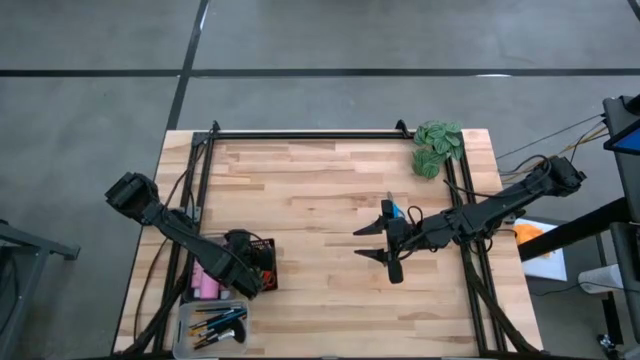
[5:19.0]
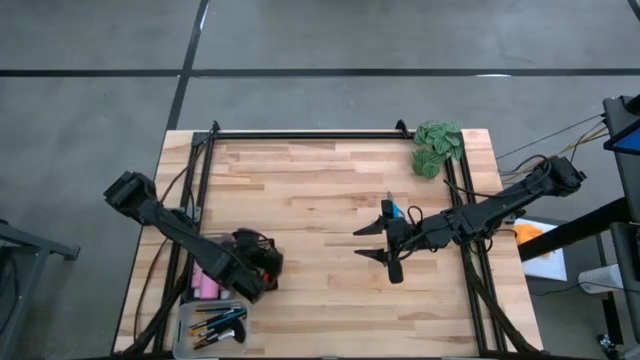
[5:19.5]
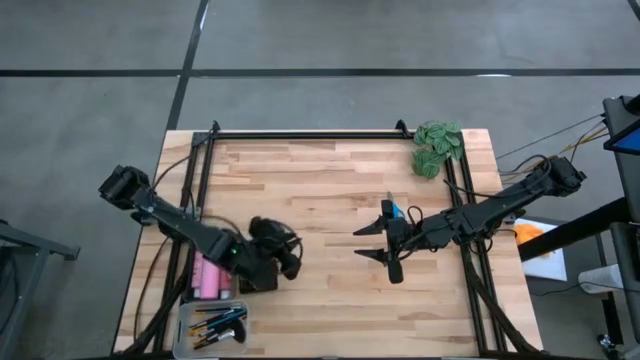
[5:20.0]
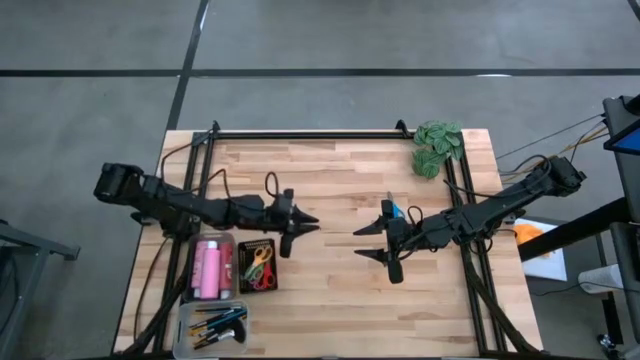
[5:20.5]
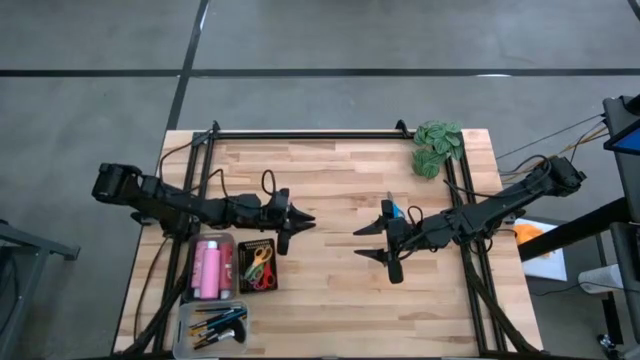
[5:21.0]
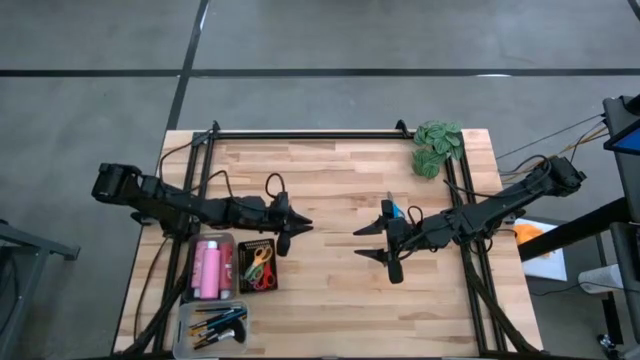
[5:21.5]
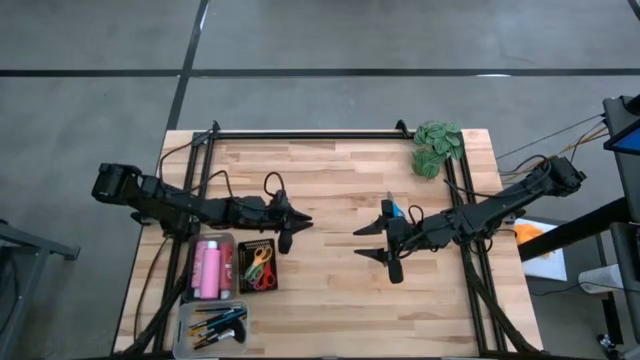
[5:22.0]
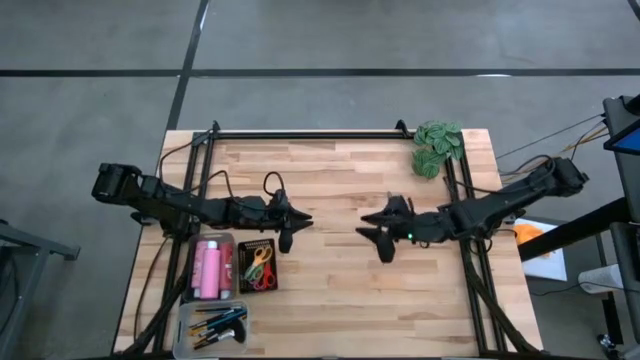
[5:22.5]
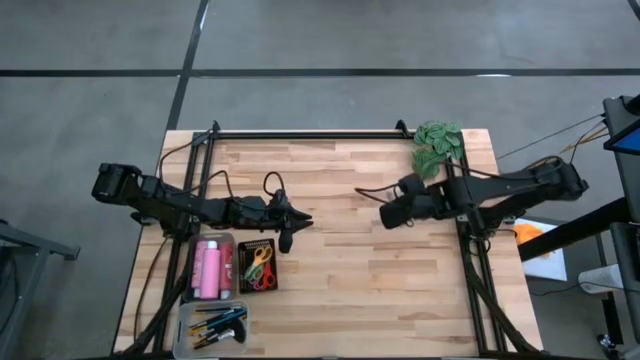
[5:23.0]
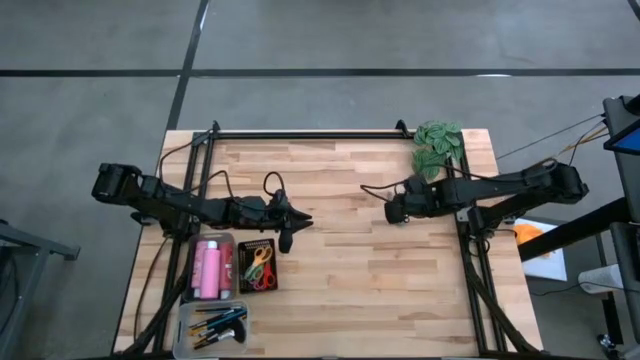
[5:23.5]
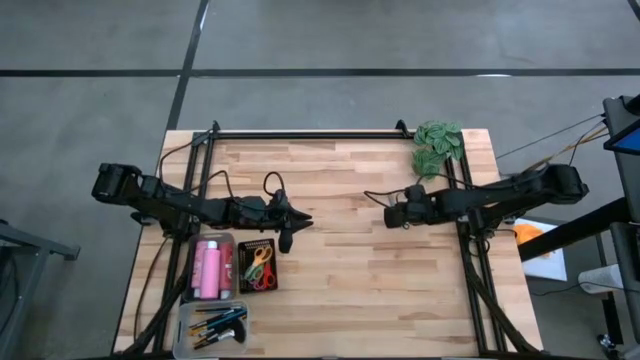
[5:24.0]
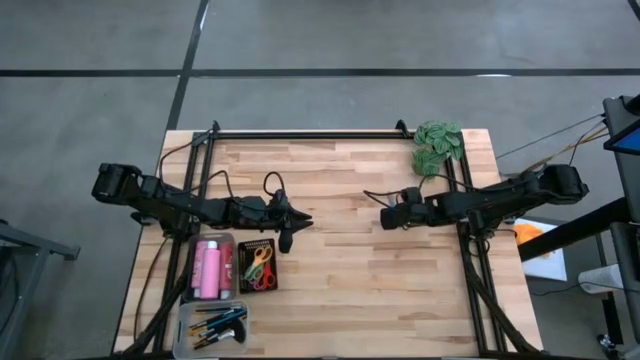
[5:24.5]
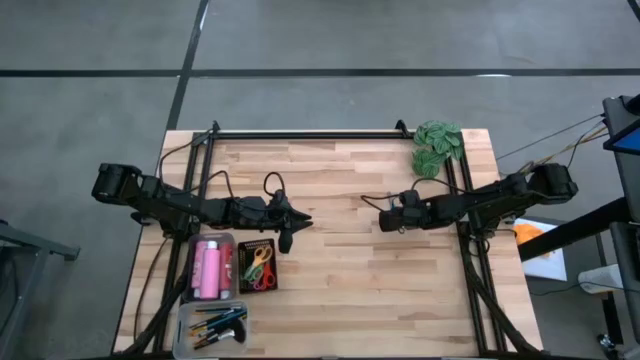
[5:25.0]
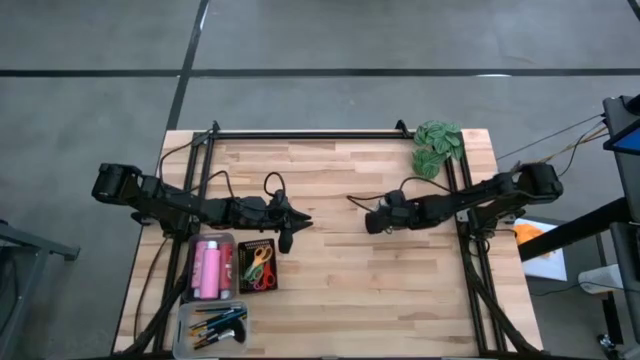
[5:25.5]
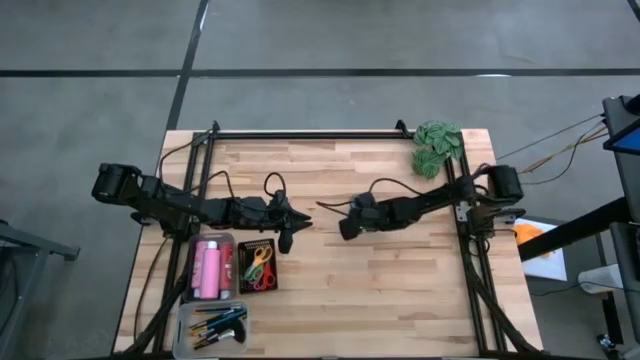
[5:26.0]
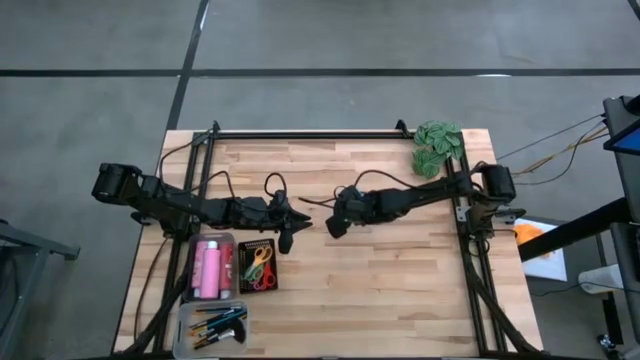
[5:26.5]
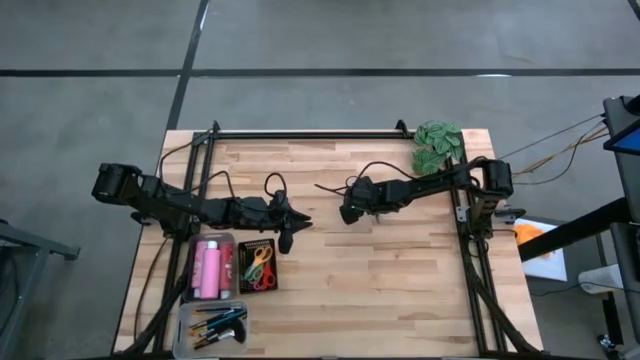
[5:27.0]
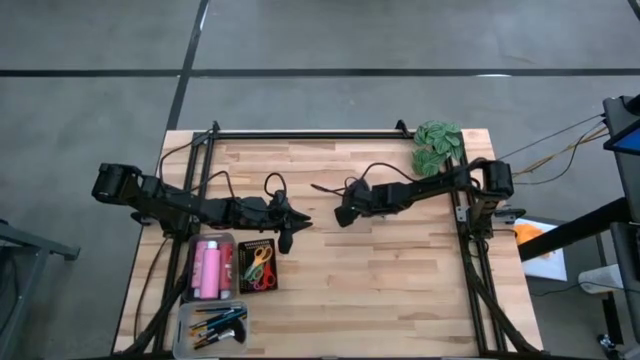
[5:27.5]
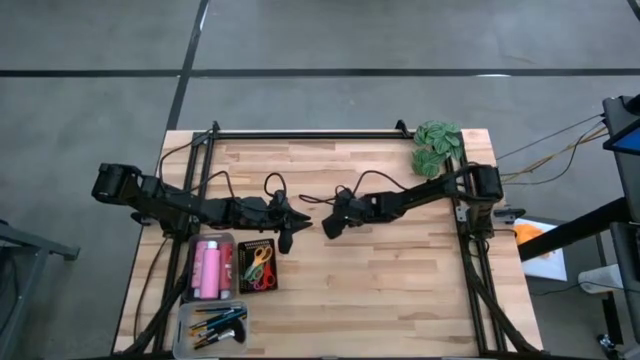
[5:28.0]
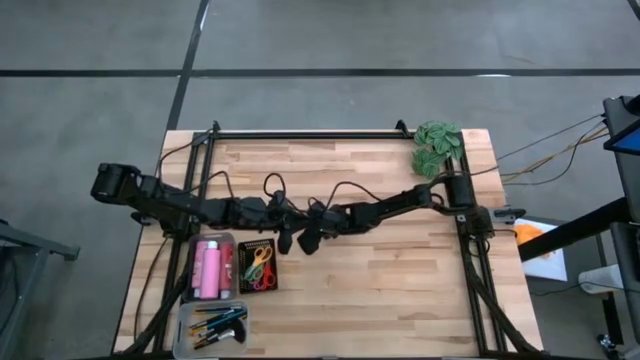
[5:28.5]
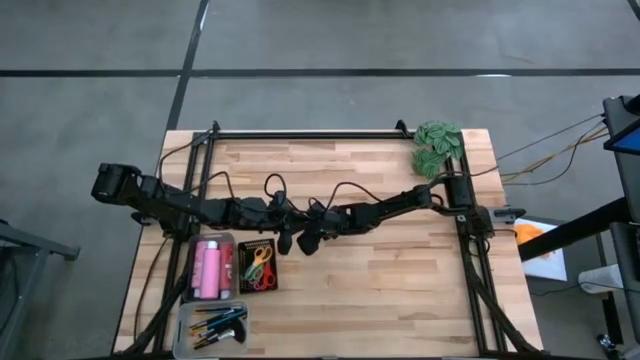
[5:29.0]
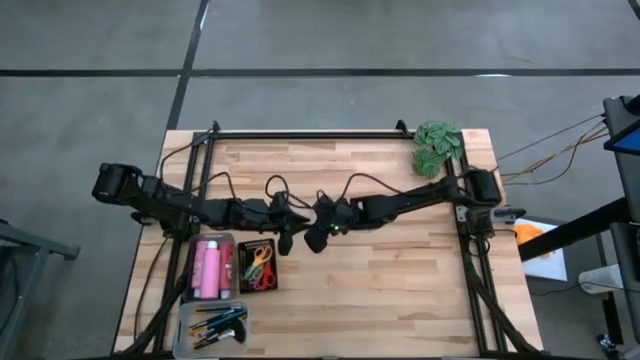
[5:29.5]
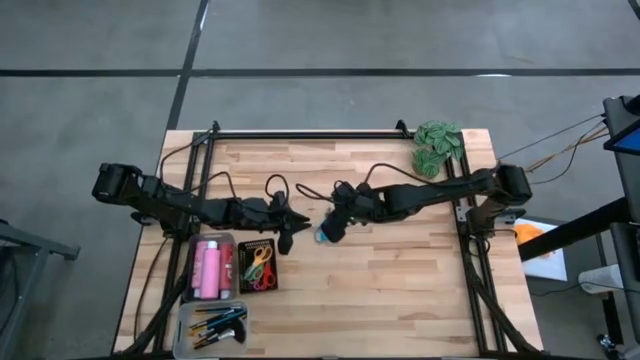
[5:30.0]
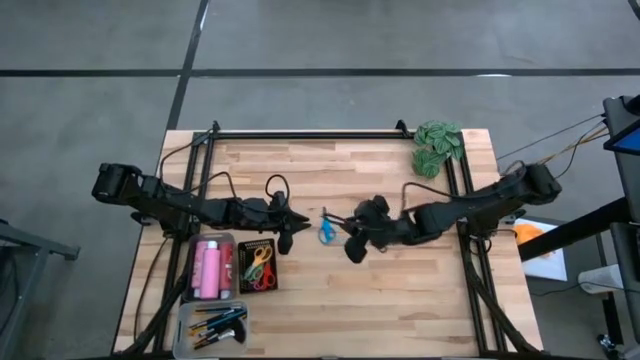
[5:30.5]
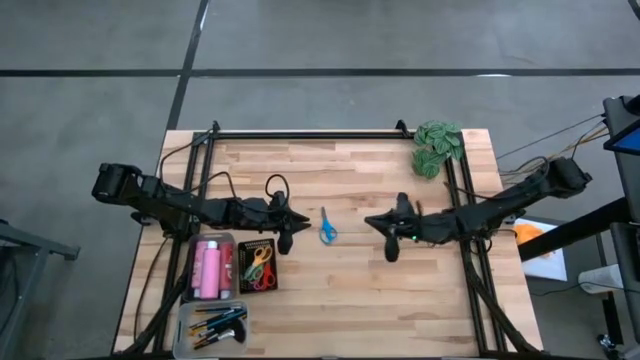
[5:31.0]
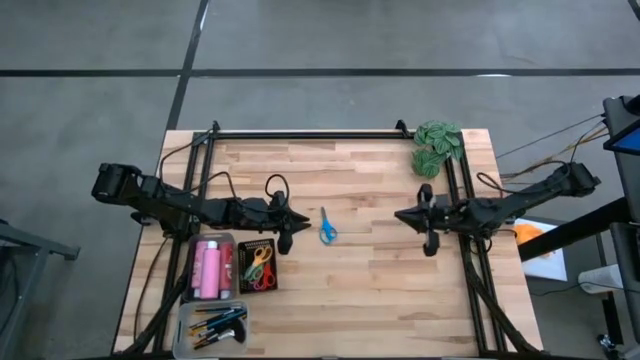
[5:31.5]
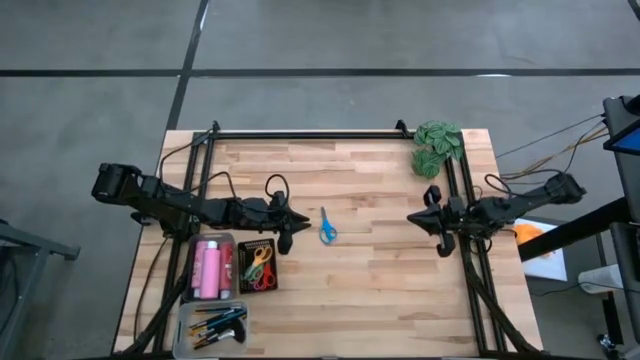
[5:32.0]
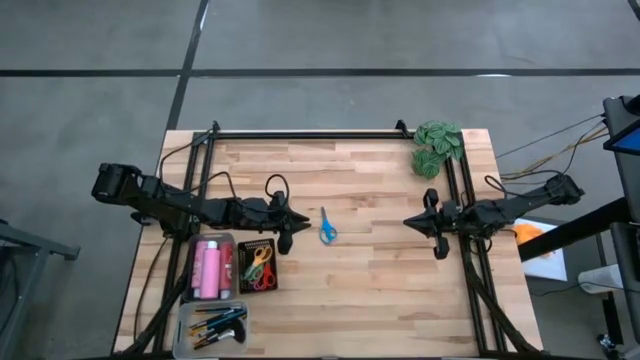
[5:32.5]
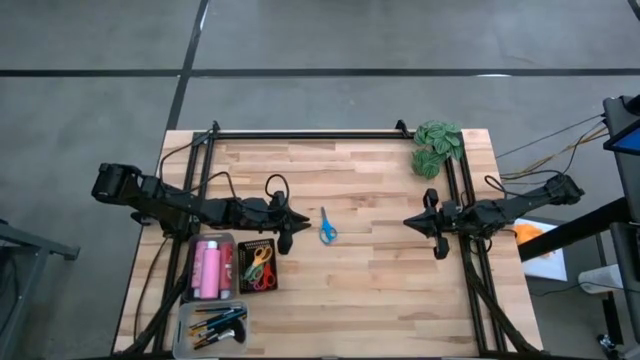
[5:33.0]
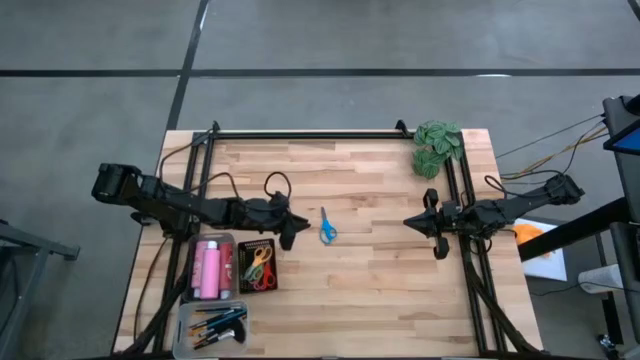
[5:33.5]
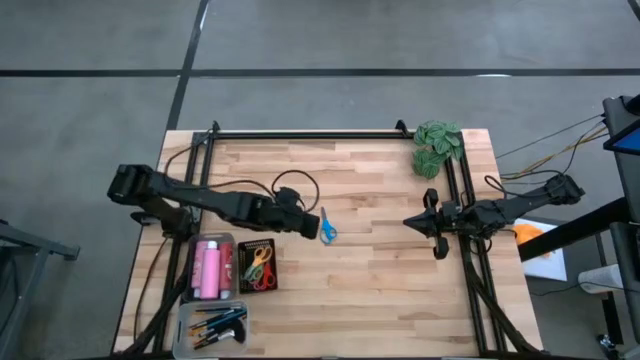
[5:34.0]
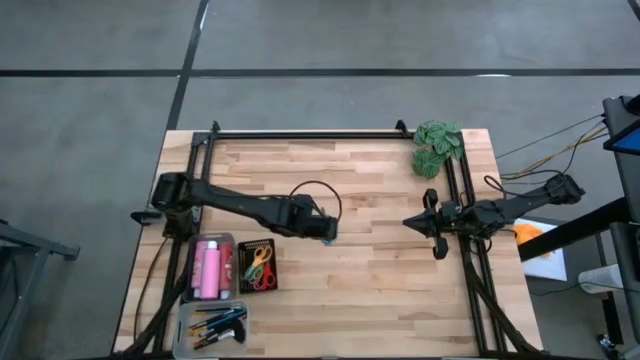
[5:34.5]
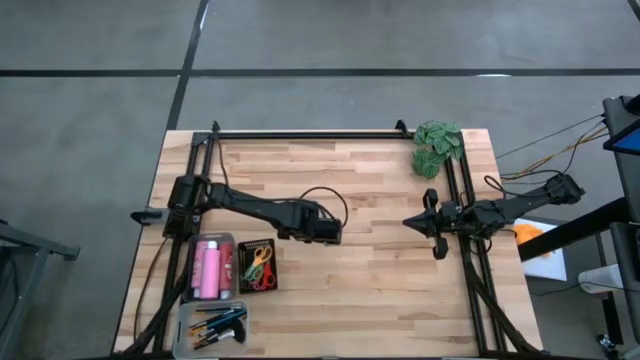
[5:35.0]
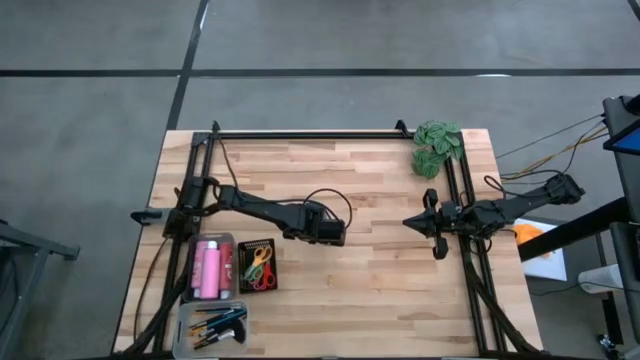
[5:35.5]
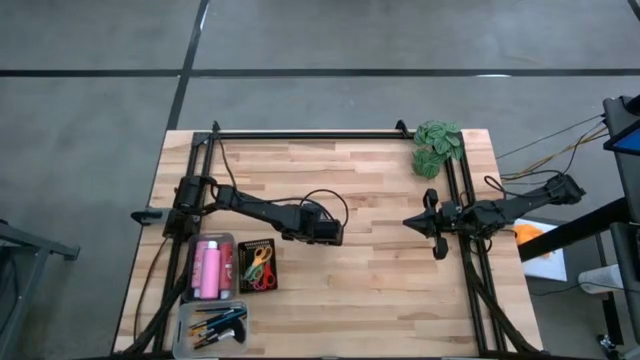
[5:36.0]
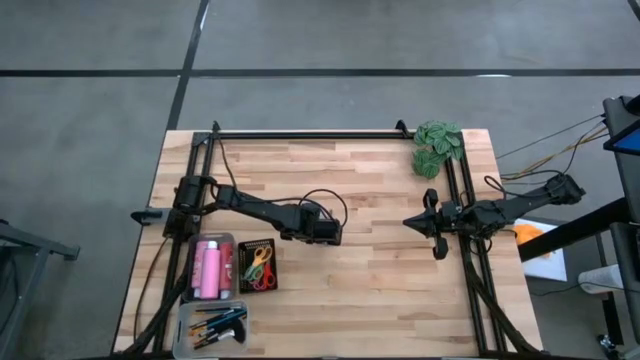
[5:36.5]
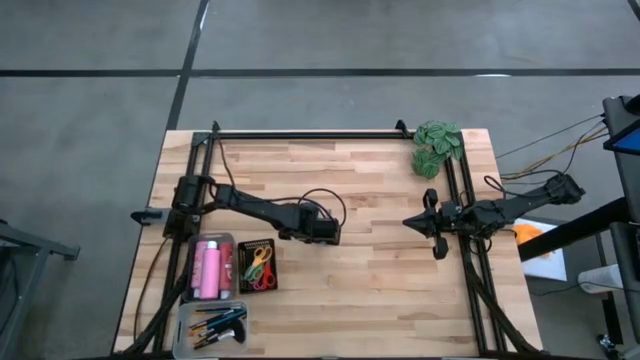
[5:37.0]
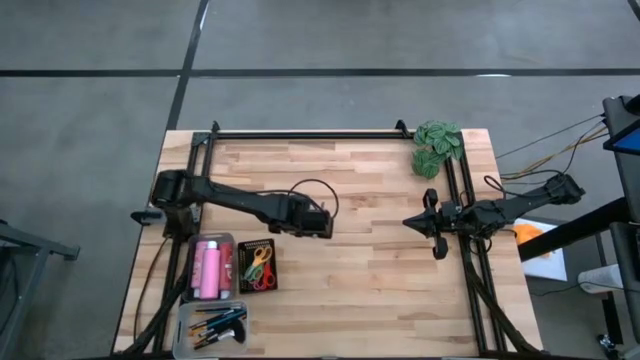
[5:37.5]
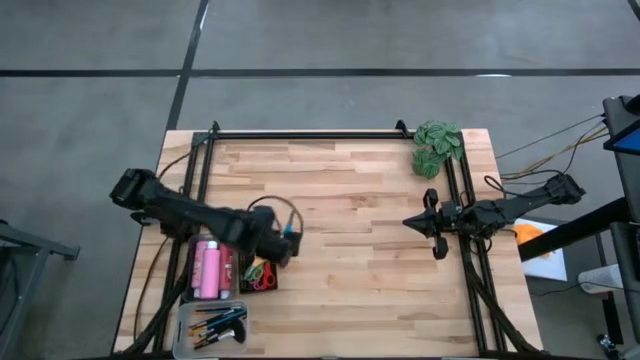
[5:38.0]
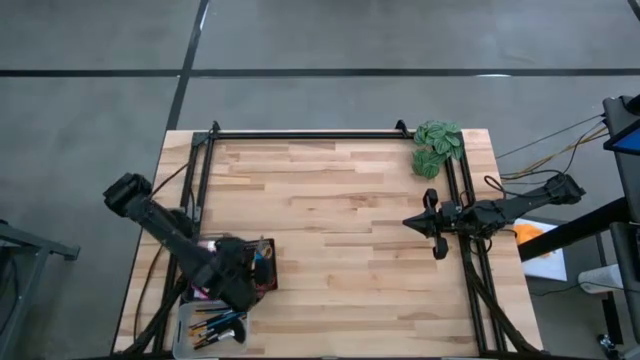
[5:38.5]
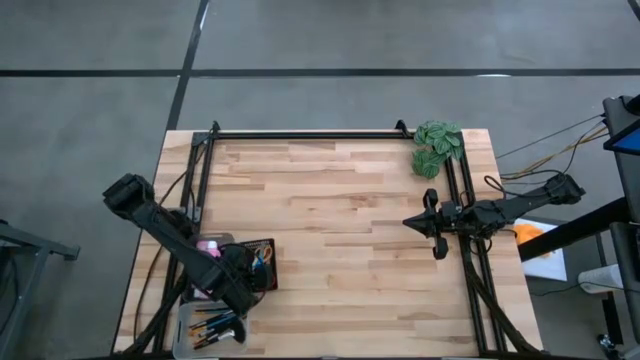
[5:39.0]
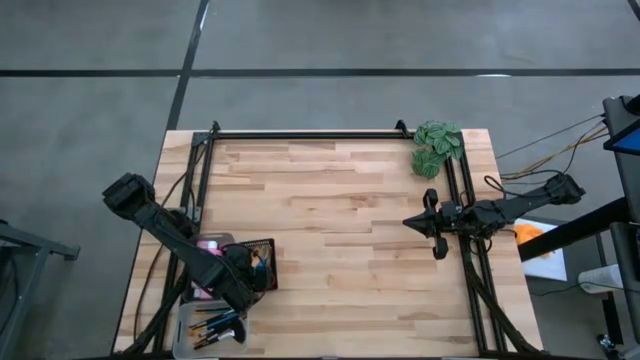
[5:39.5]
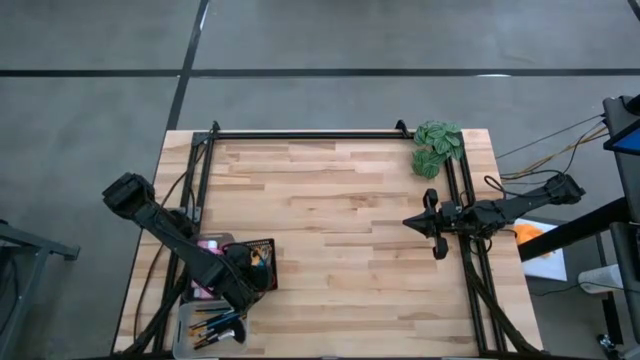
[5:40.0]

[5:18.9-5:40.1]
Task: Pick & Place Paint Supplies
Put the blue scissors into the black bin

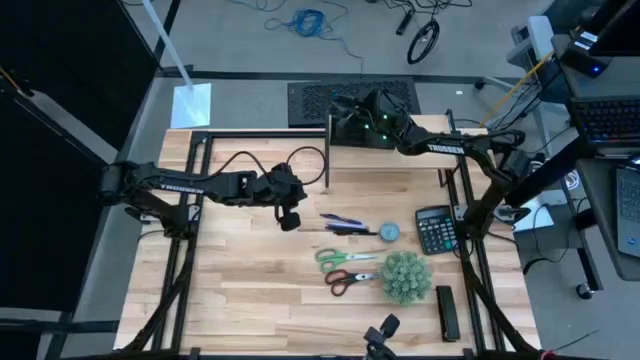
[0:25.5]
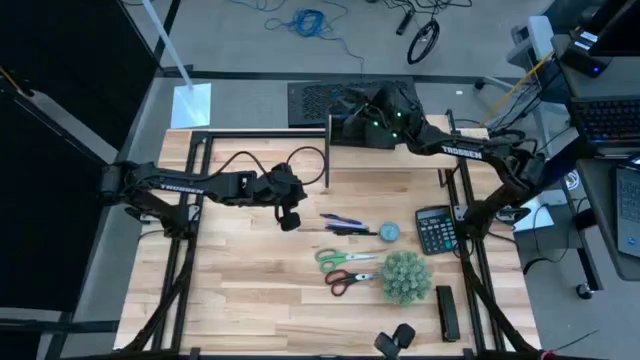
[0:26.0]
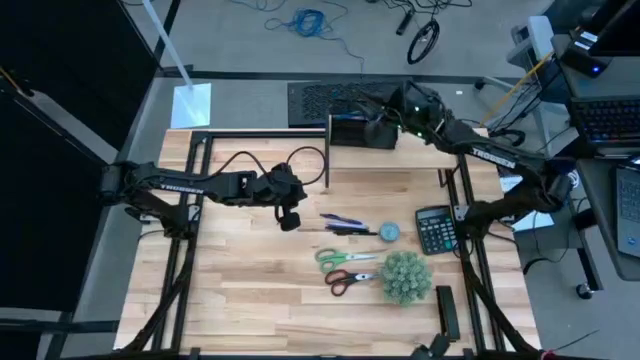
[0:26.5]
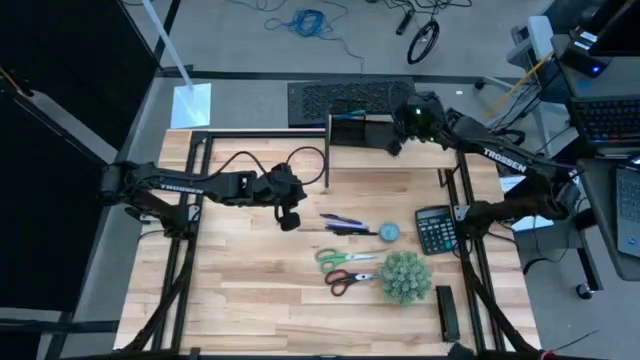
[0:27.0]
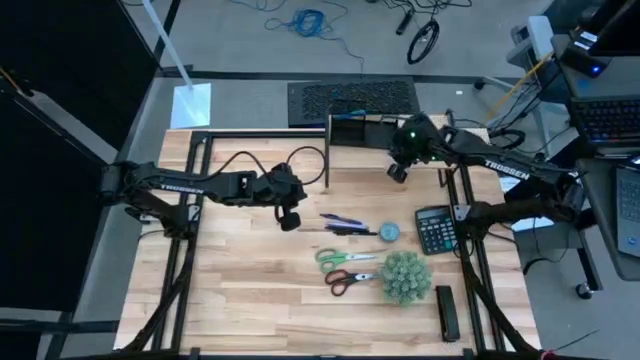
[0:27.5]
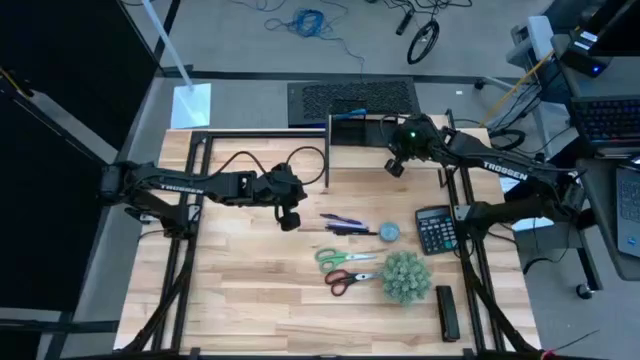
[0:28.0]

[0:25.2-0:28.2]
Task: Pick and place office supplies into organizer
Adjust the black desk organizer on the shelf
